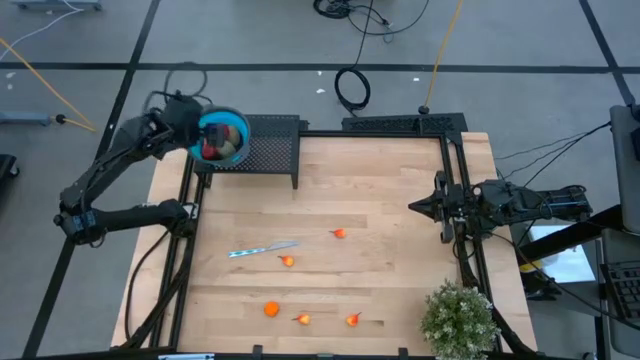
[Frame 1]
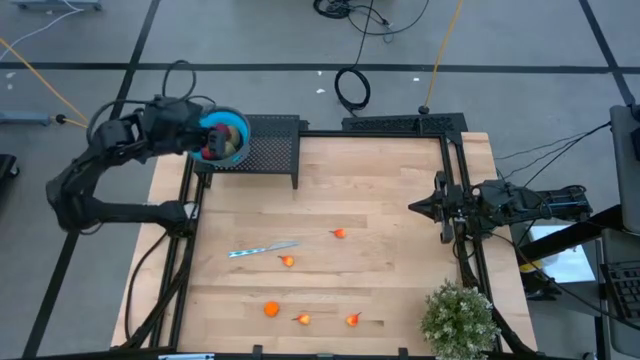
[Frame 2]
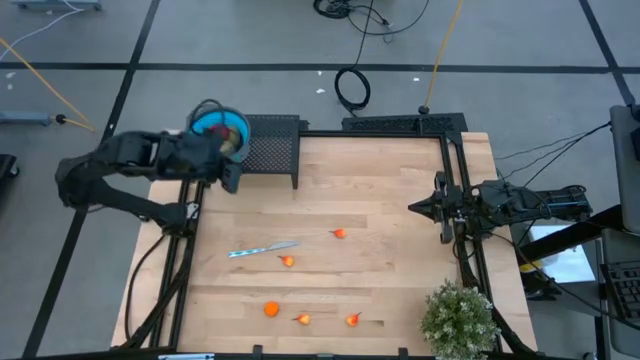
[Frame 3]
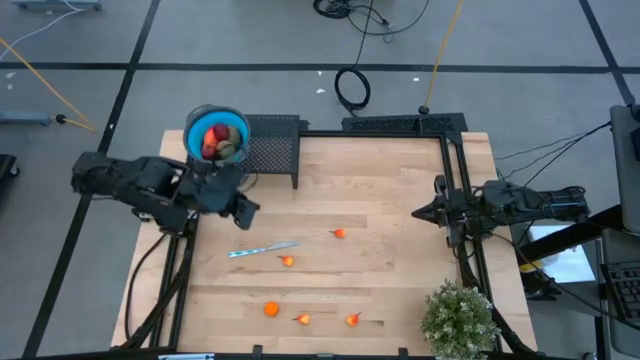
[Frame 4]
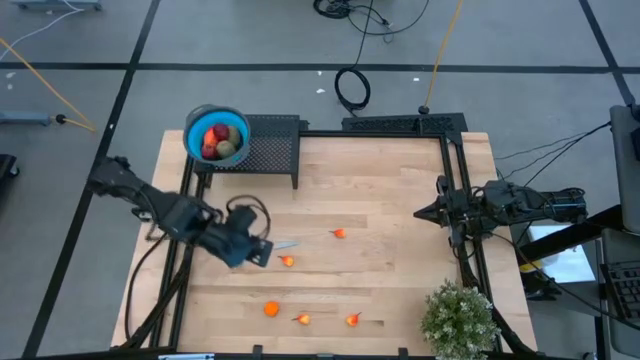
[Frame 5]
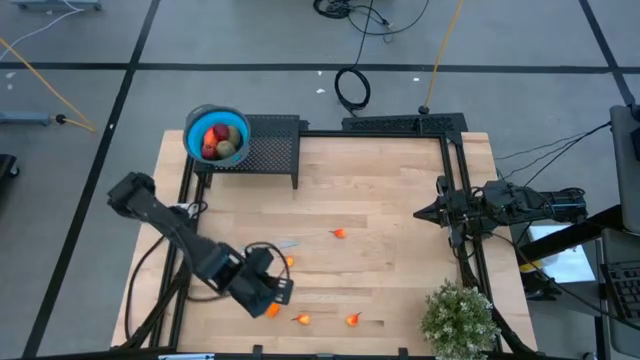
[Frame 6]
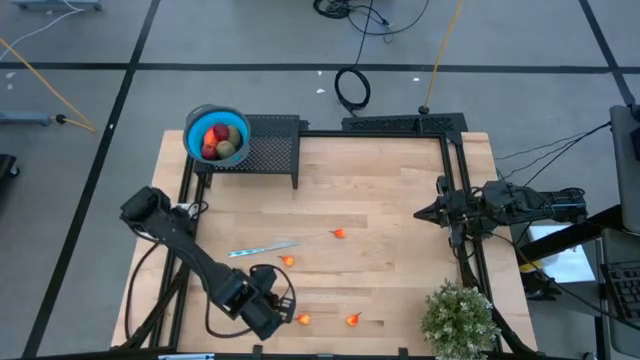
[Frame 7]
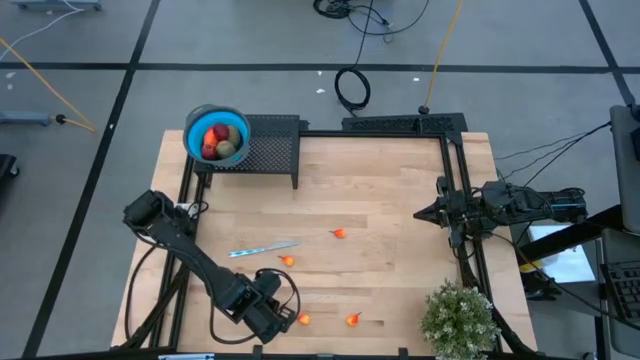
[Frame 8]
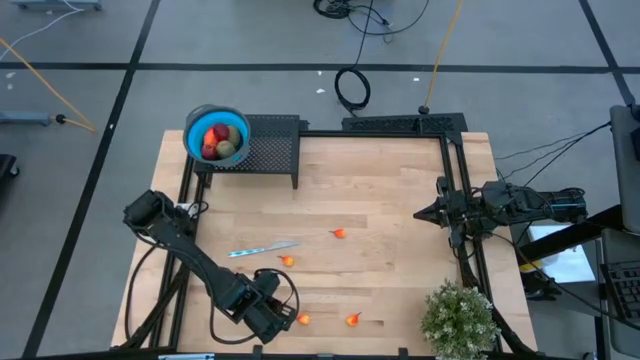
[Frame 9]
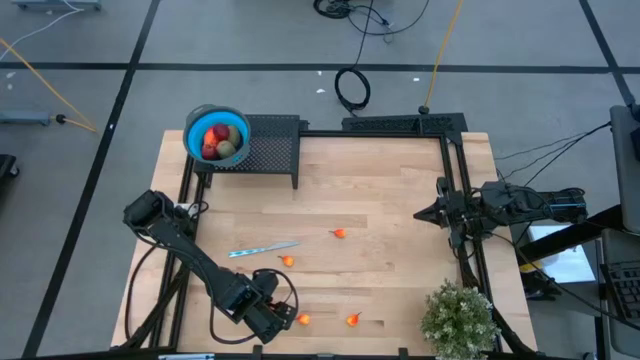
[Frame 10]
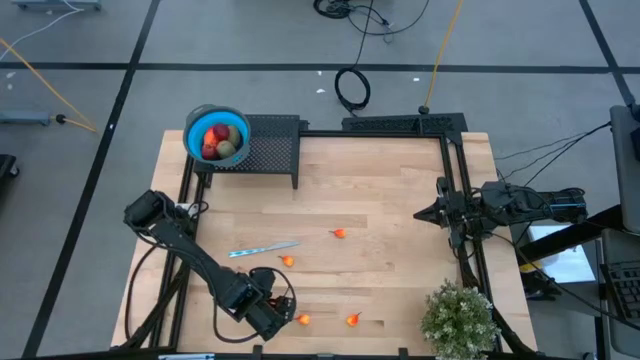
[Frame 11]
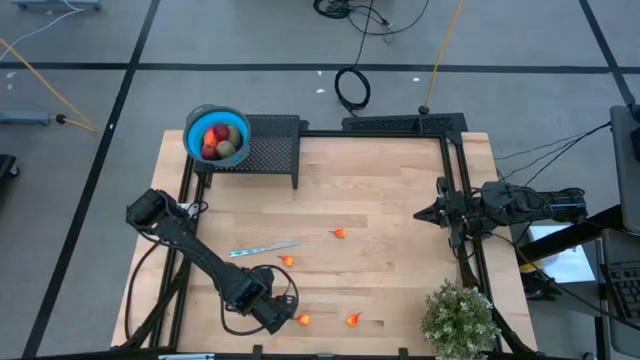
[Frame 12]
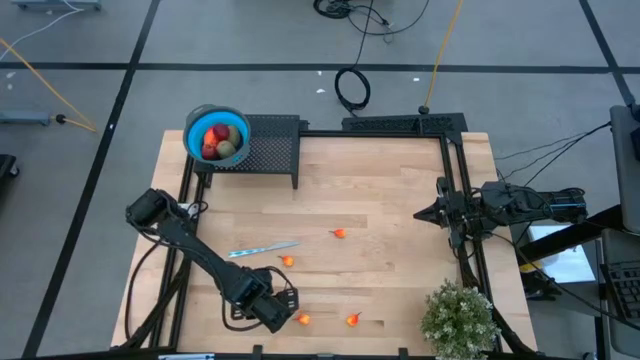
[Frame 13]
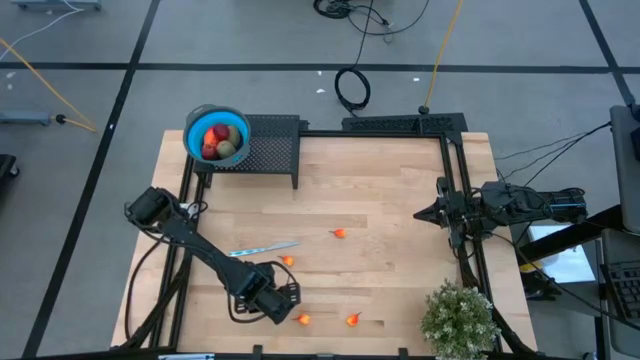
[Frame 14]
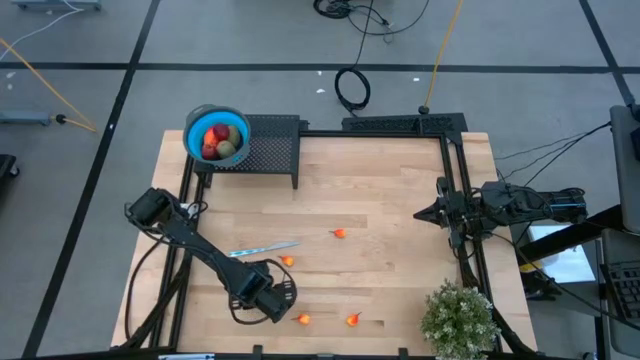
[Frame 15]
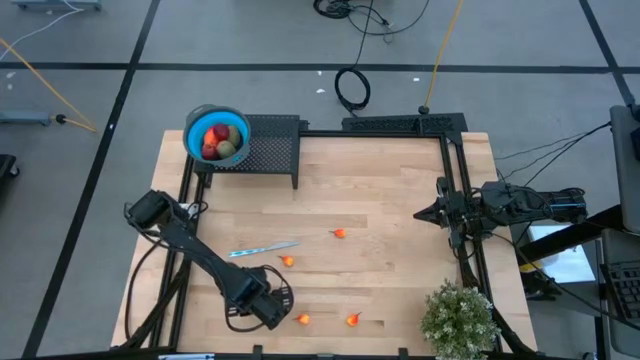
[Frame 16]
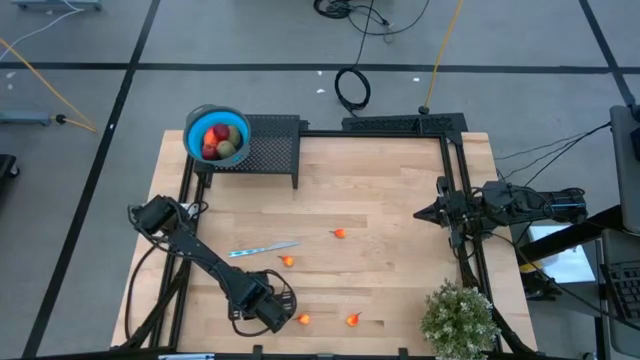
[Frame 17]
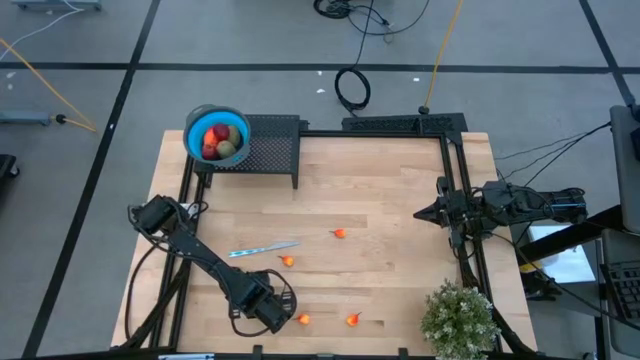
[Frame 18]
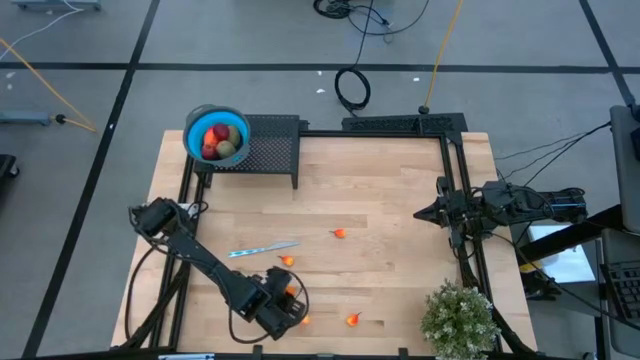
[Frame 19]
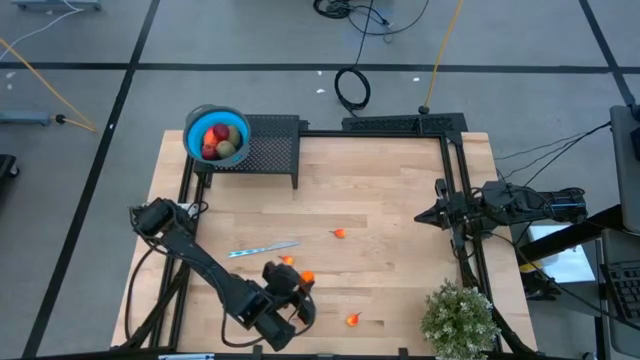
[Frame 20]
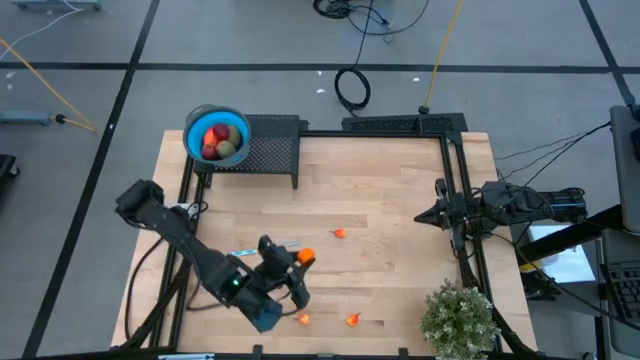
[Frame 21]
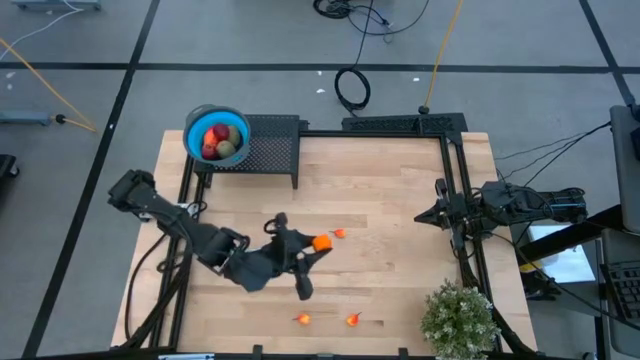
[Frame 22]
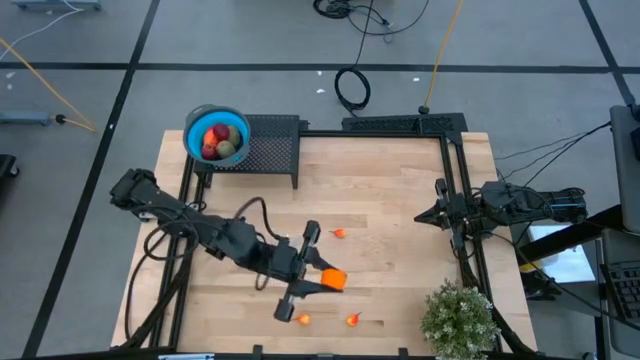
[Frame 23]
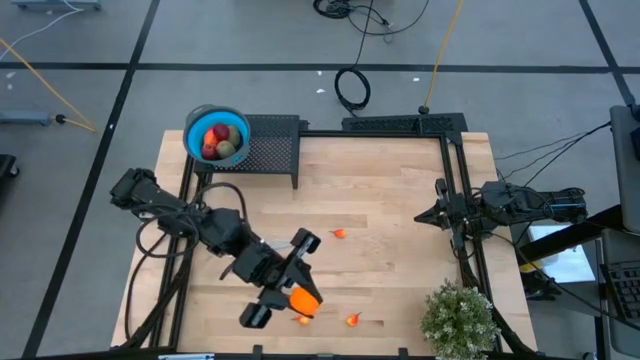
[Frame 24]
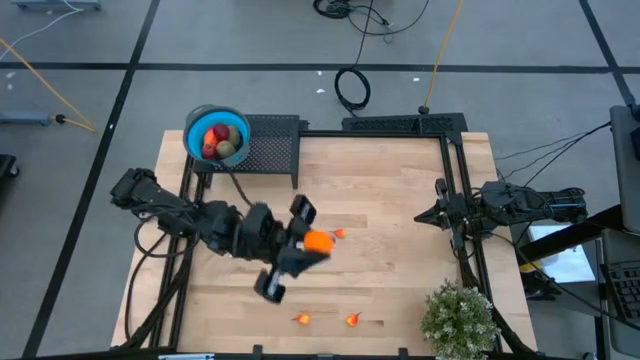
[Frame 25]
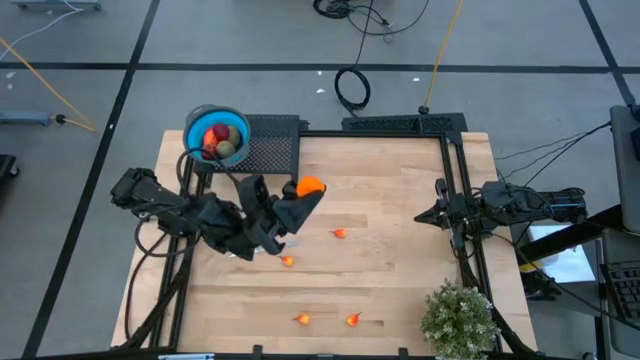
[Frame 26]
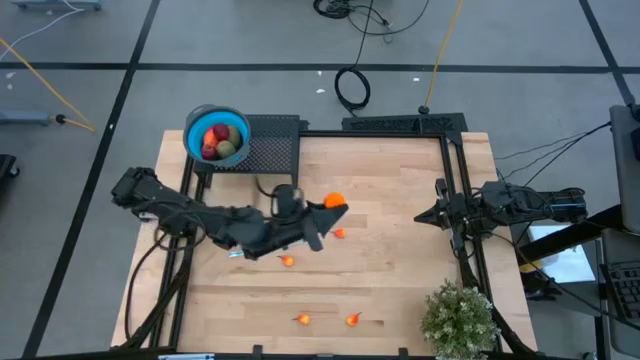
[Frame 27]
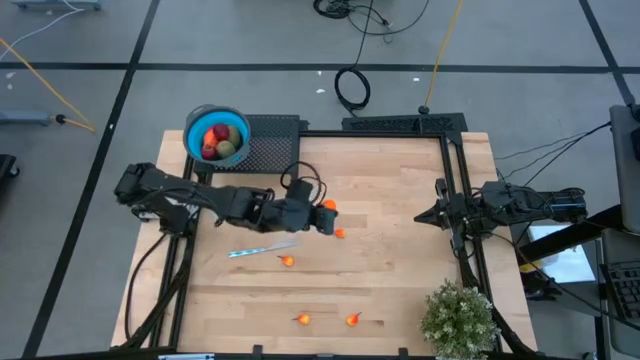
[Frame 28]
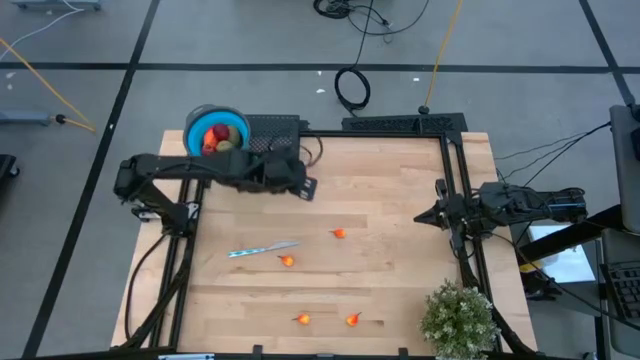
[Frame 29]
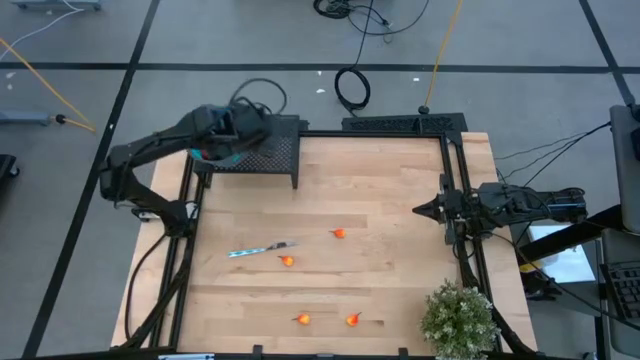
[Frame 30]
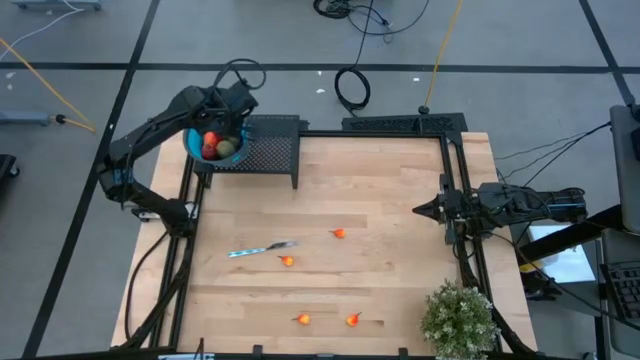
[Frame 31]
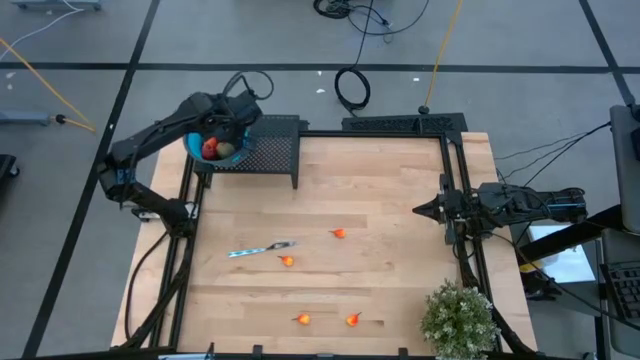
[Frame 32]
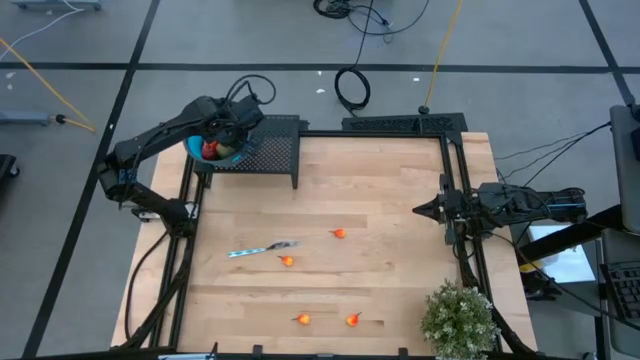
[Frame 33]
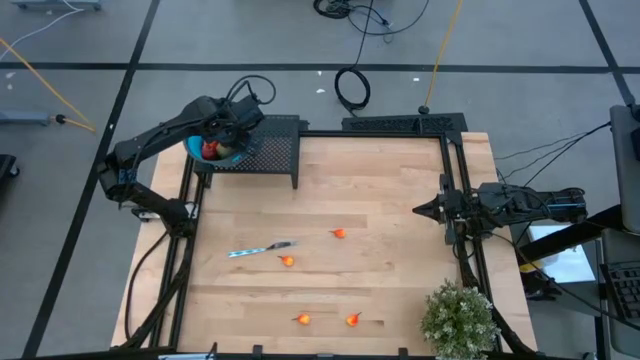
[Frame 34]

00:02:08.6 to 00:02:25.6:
Task: Pick & Place Fruit
Put the tangerine into the blue strainer bowl on the shelf

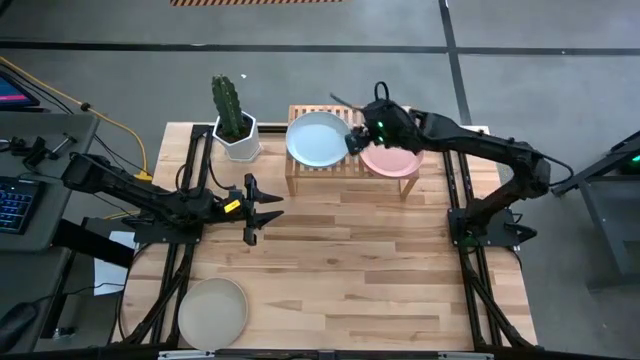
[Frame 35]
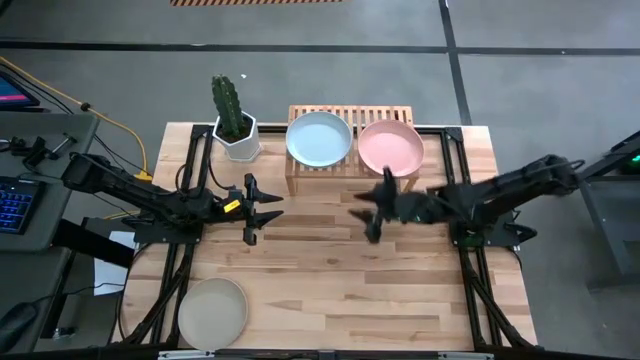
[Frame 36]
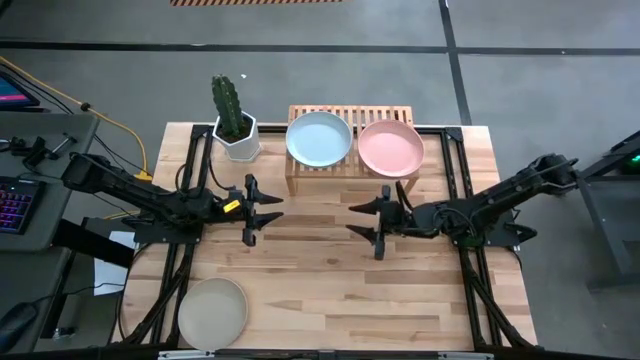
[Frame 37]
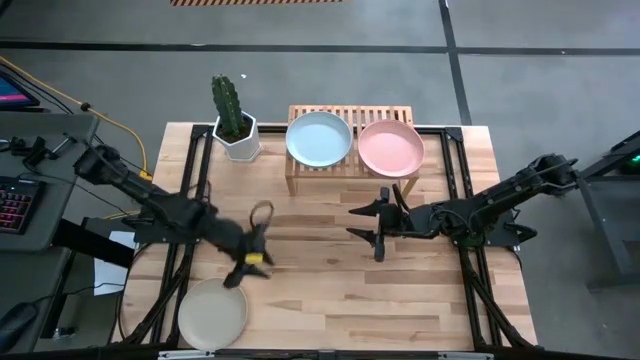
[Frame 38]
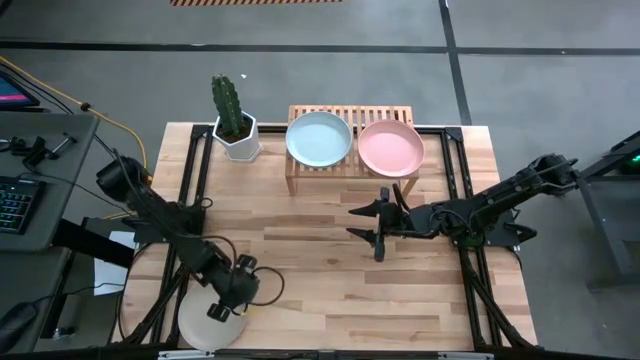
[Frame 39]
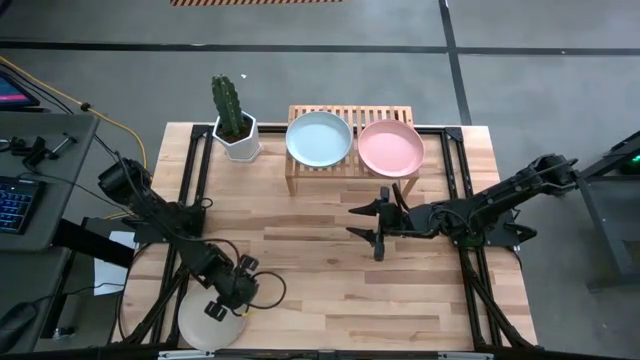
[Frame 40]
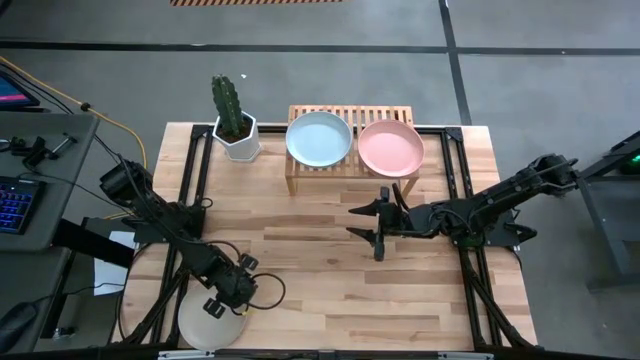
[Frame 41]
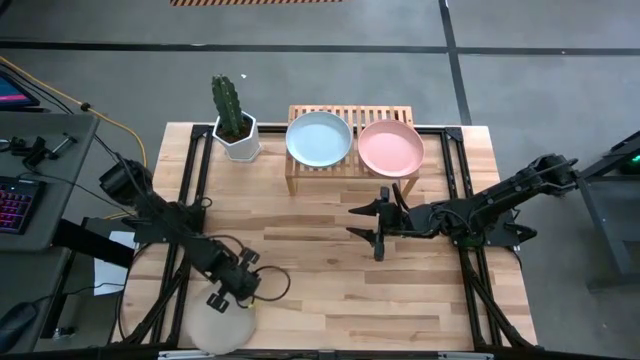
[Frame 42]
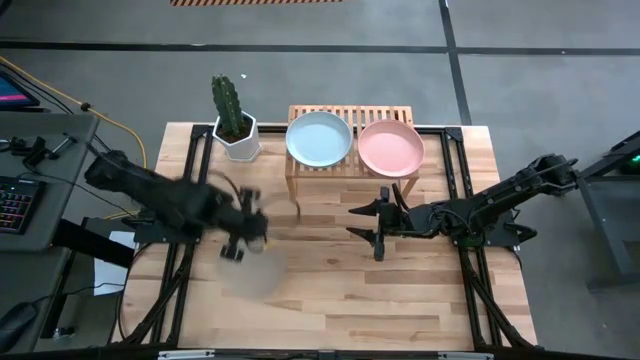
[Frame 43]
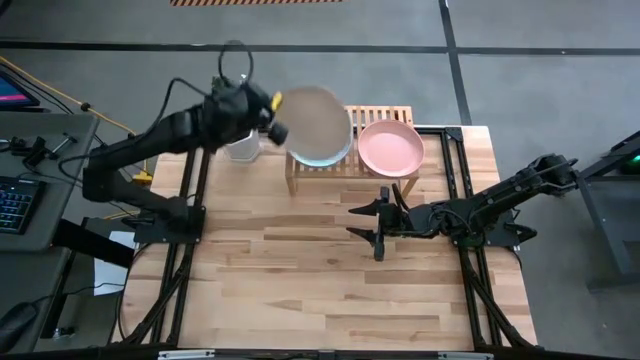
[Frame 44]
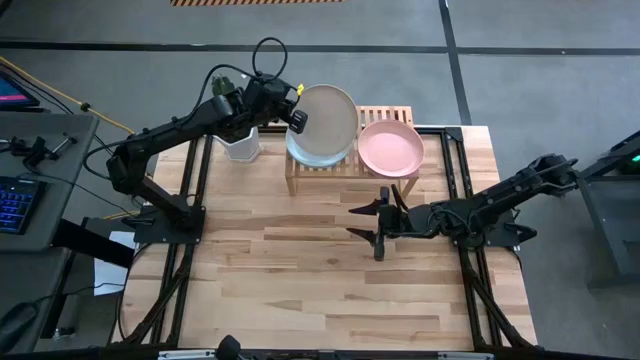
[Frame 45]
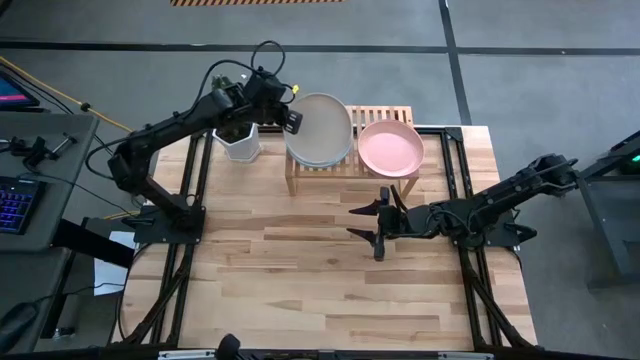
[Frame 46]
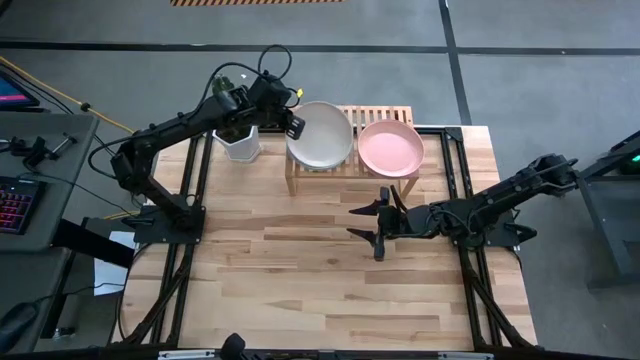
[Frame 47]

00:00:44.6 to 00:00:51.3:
Task: Place and stack plates onto a shelf
Stack the gray plate on top of the blue plate on the shelf
